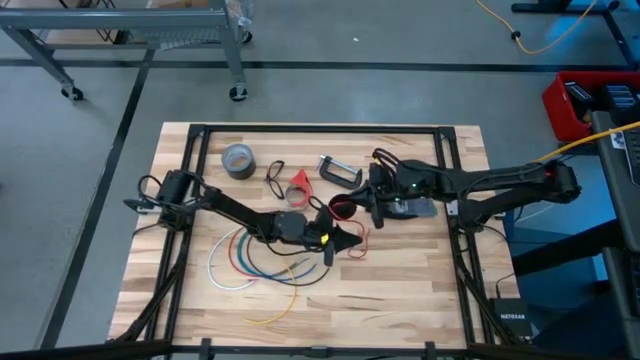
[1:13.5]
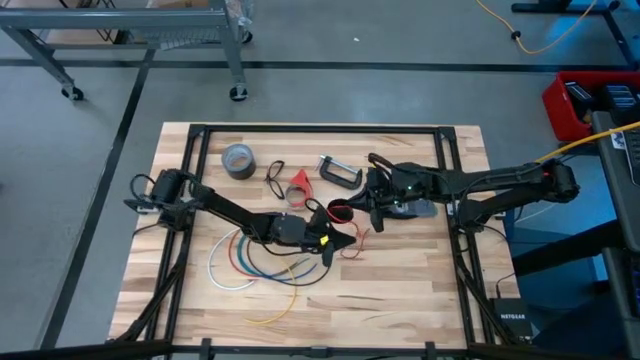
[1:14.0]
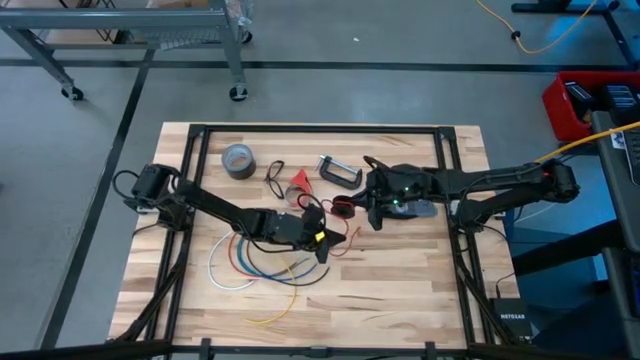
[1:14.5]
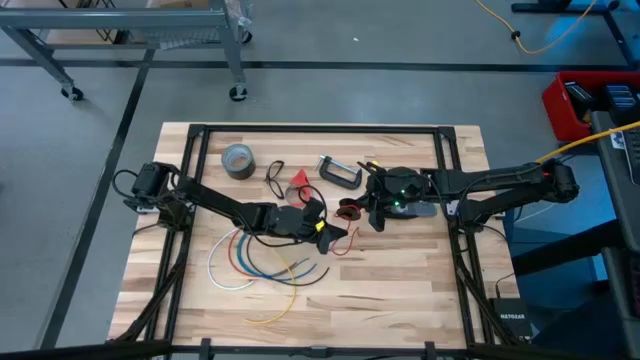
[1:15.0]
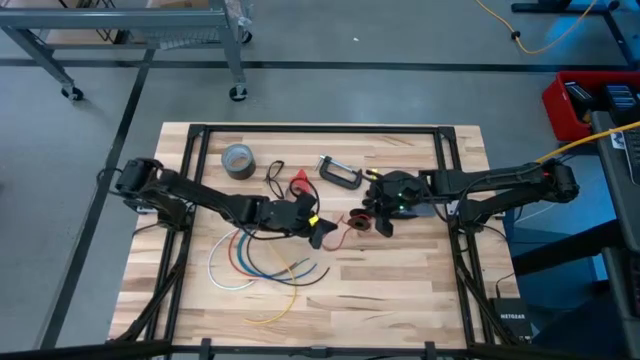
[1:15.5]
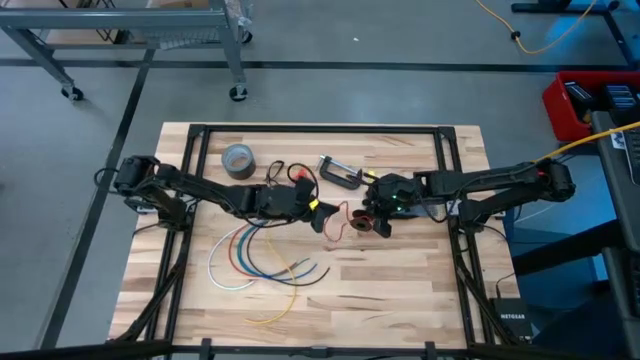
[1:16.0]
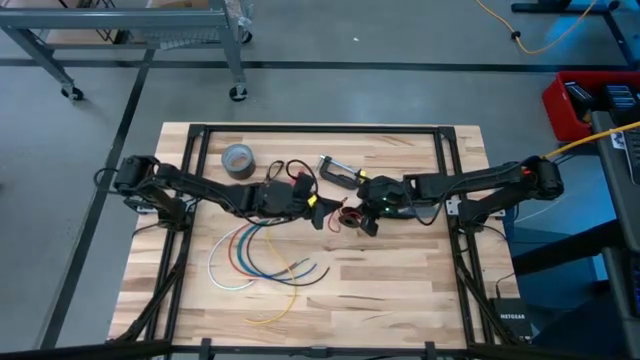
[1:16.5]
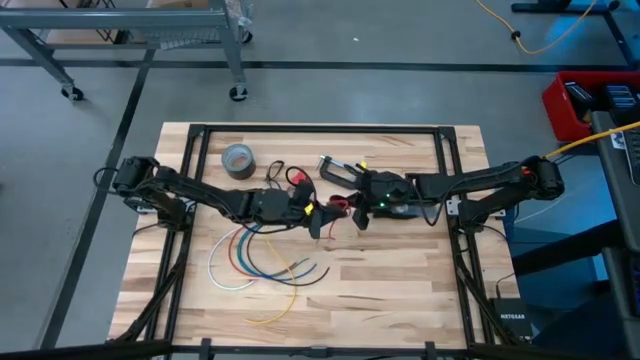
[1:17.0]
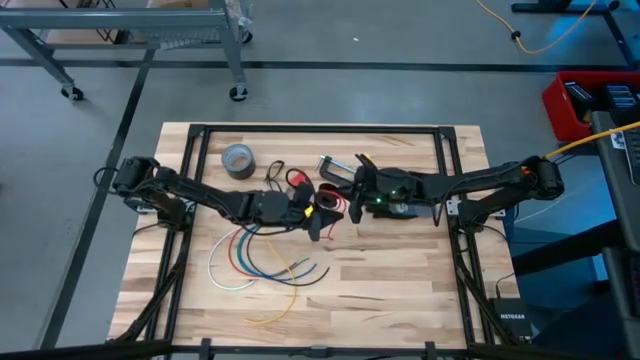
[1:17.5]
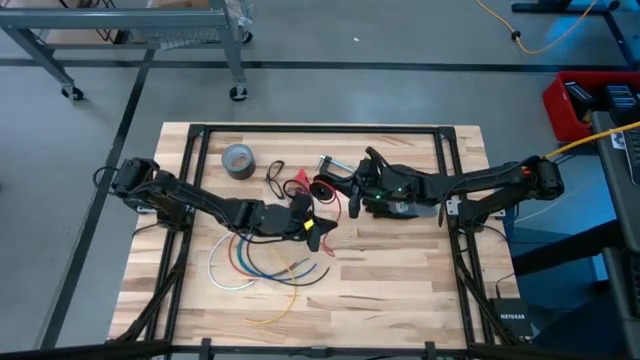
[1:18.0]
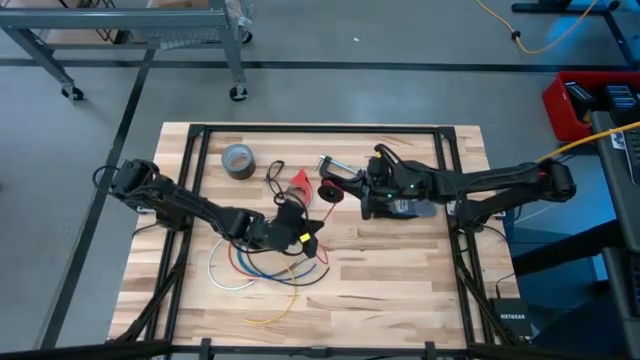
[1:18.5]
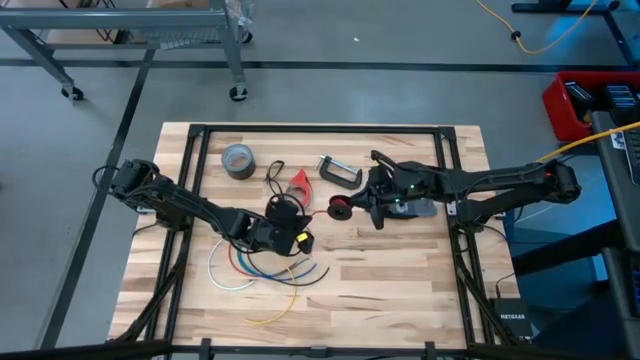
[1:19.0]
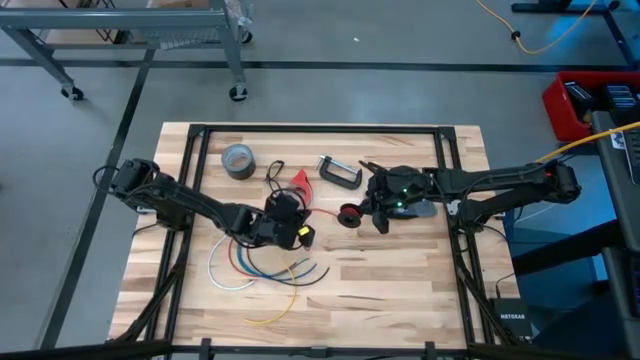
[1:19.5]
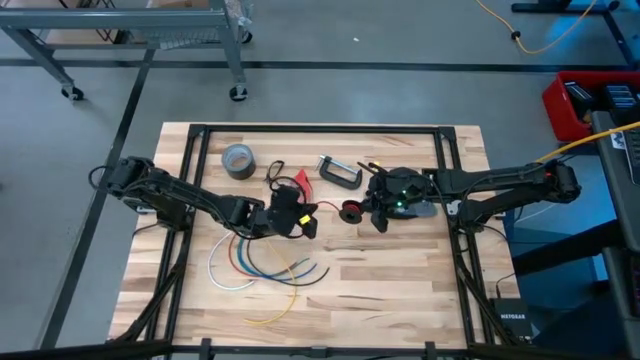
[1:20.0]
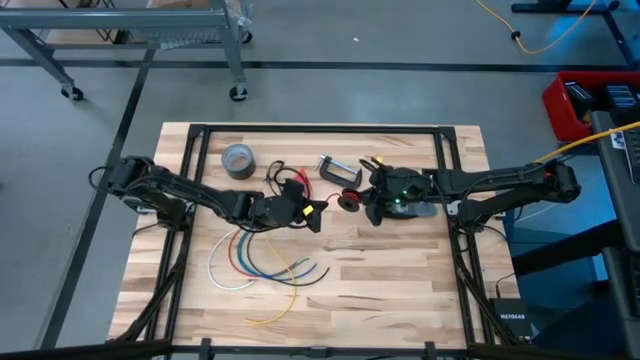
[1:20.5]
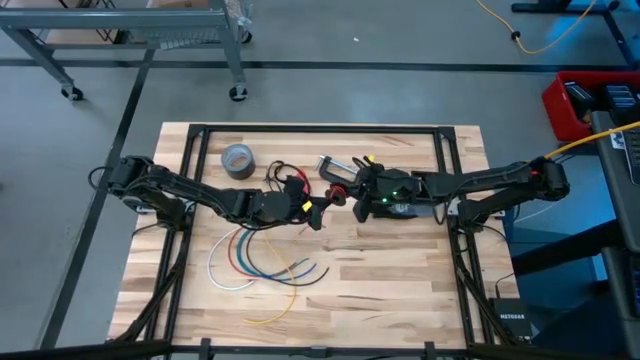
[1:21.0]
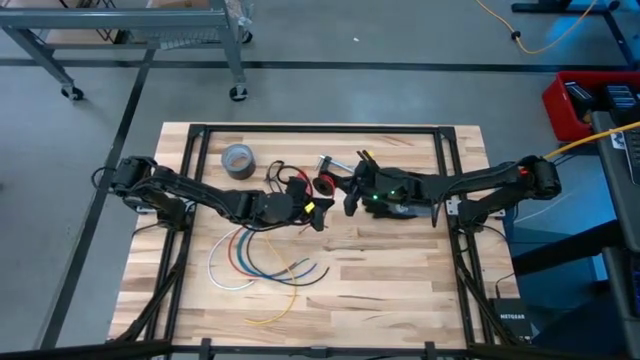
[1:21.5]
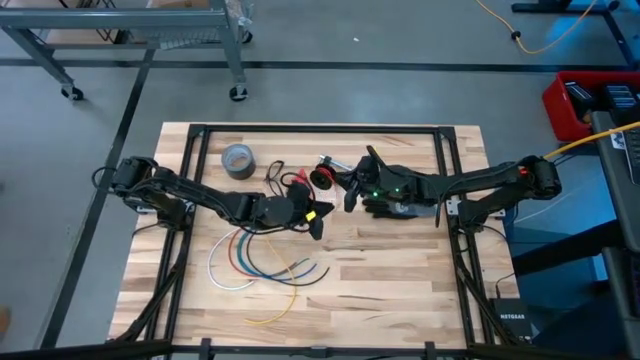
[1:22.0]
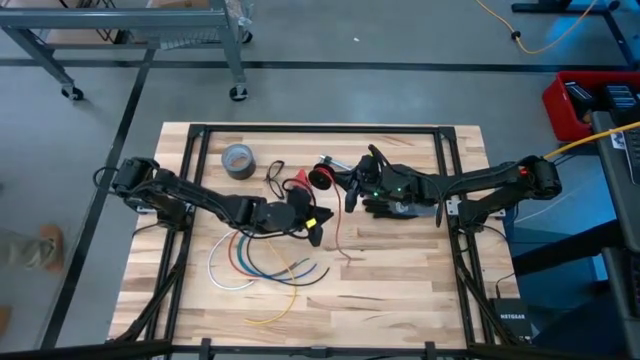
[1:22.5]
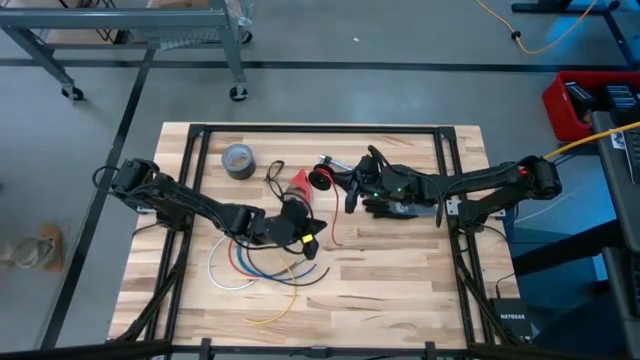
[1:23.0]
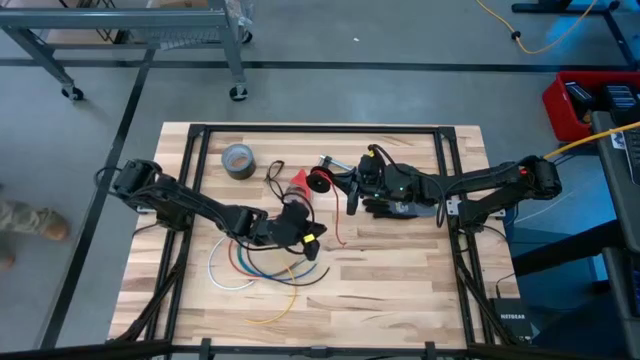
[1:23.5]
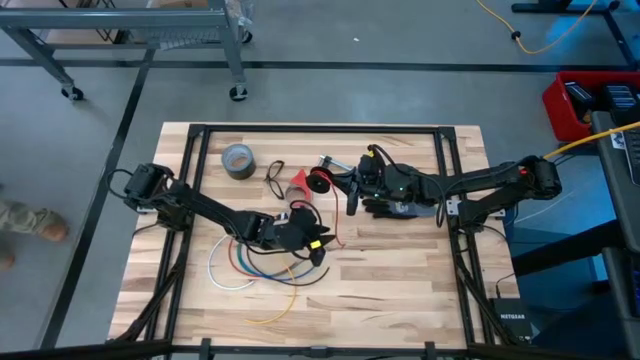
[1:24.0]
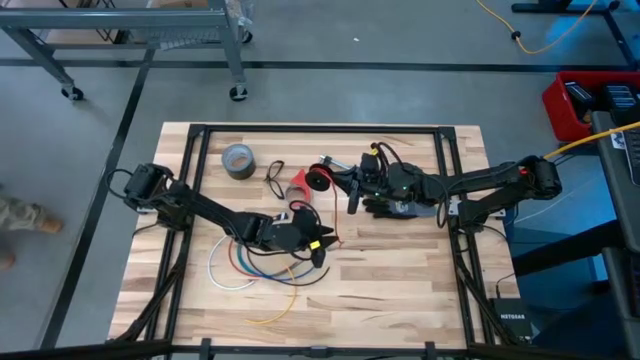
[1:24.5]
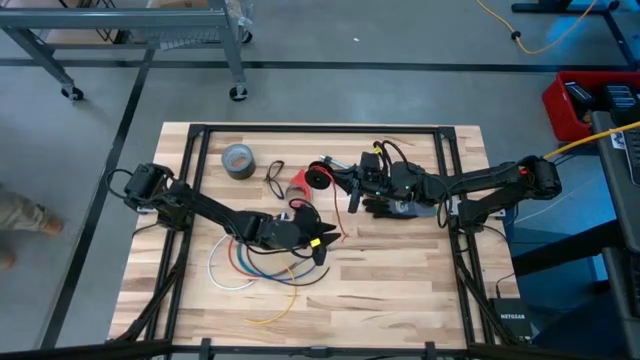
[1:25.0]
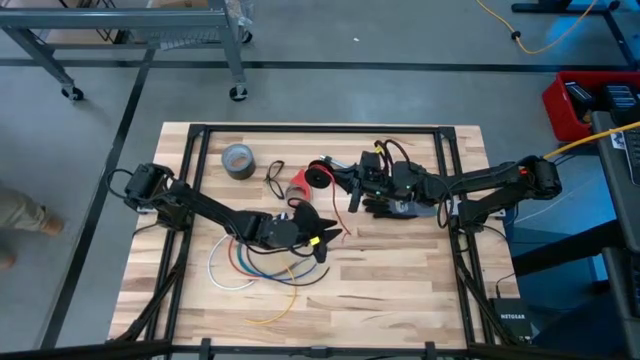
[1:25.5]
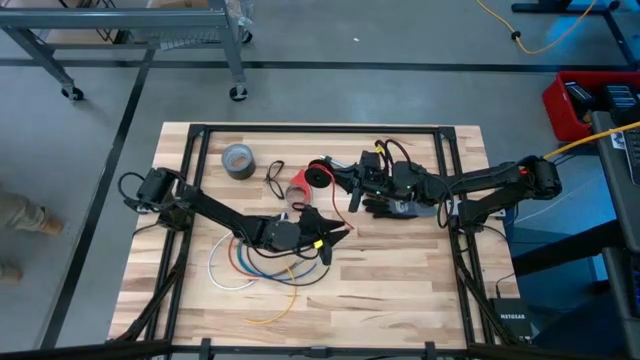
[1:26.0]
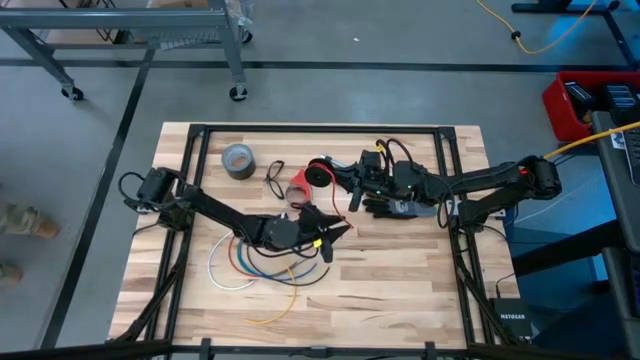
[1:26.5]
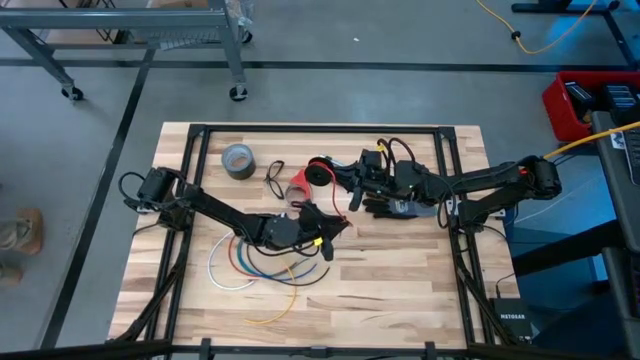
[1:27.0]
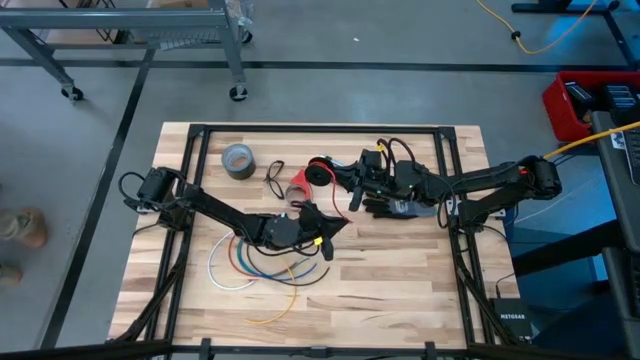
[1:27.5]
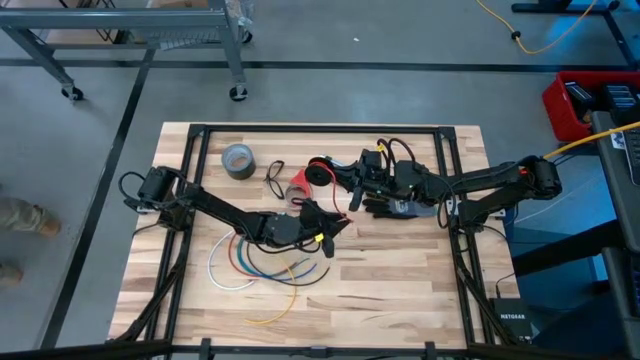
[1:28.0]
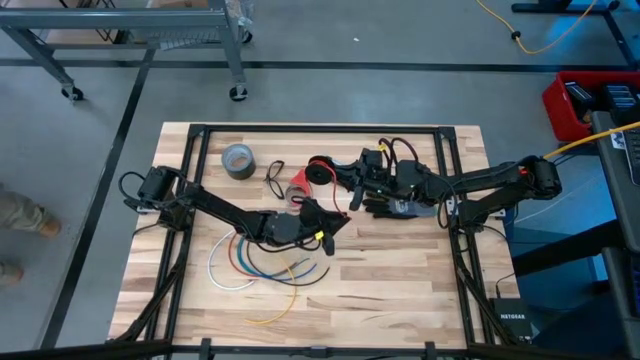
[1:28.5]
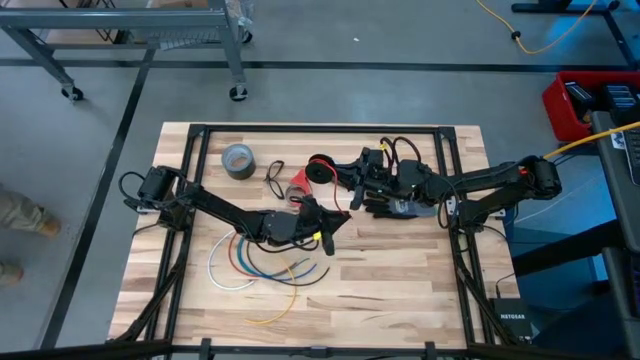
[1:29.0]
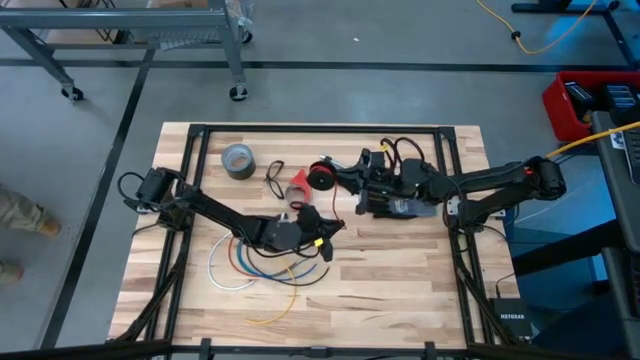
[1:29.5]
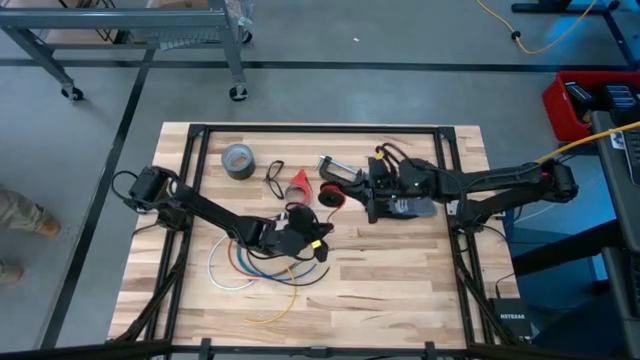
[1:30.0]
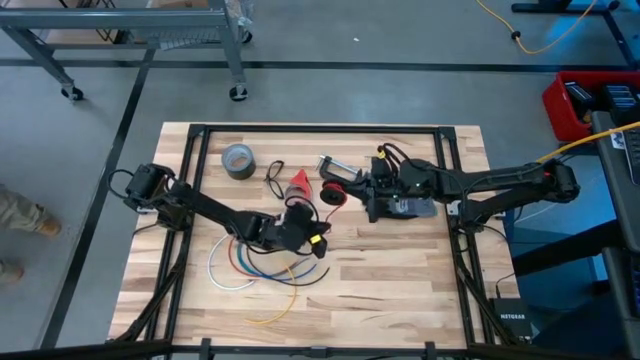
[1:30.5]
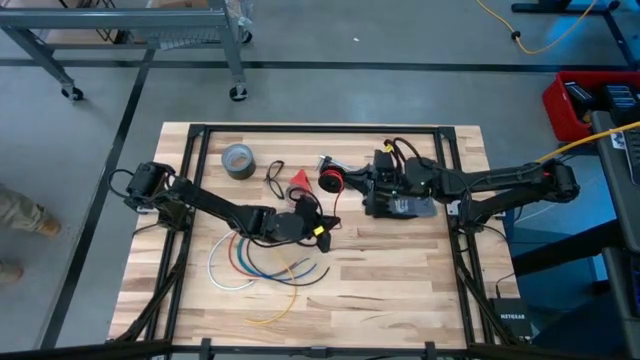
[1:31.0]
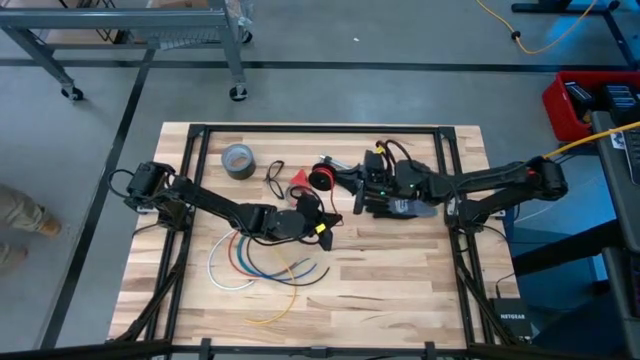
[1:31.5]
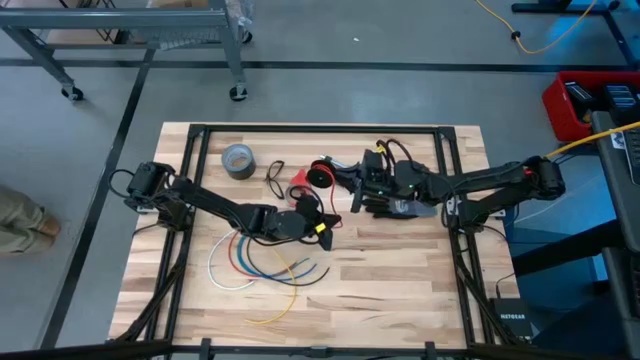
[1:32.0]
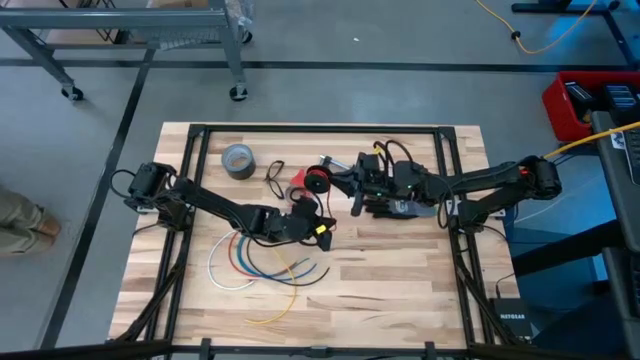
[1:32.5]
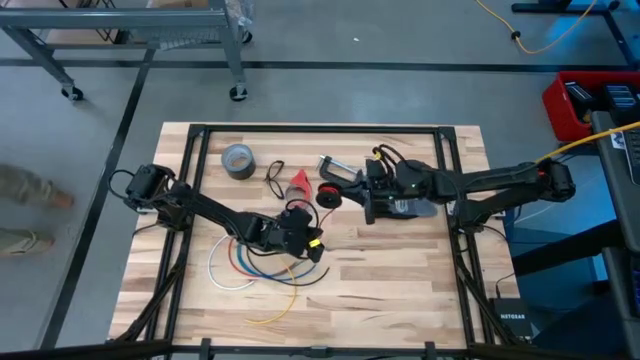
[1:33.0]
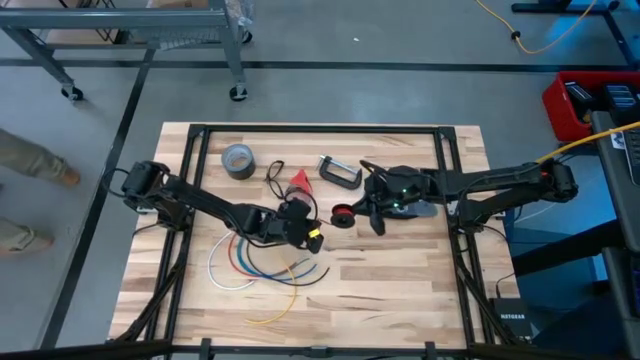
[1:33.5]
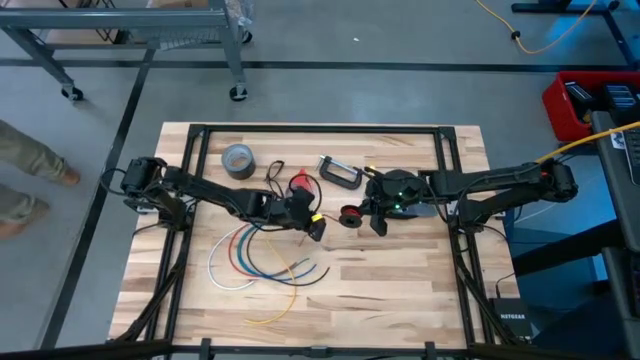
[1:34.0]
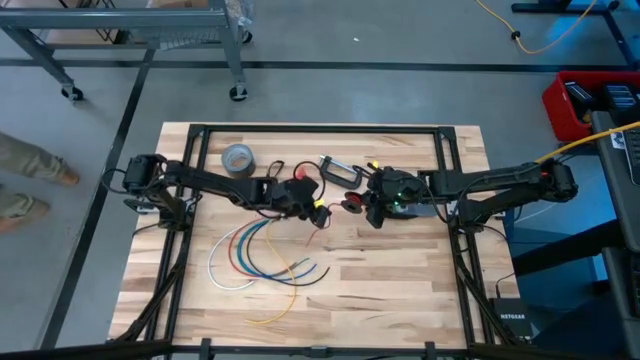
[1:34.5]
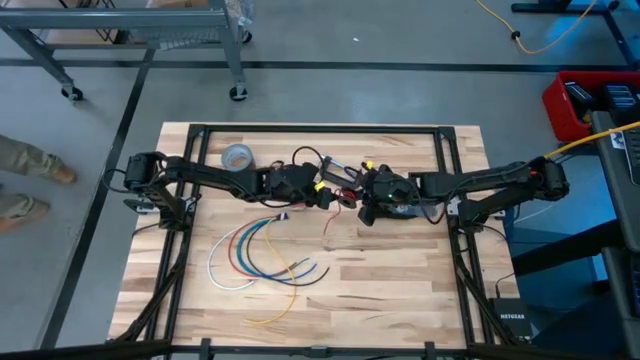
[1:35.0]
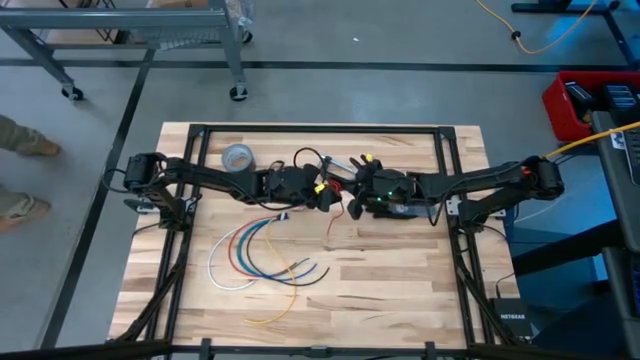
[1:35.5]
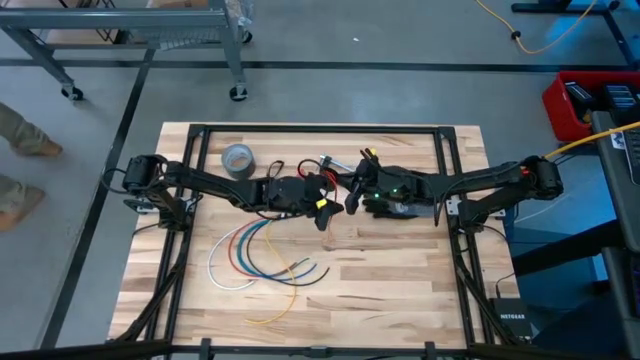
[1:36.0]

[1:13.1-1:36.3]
Task: Coil cords
Coil the orange wire on the spool
